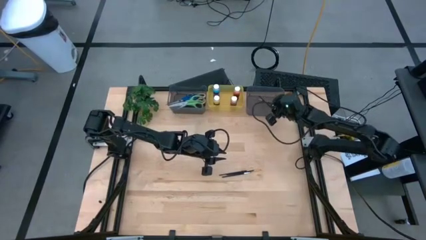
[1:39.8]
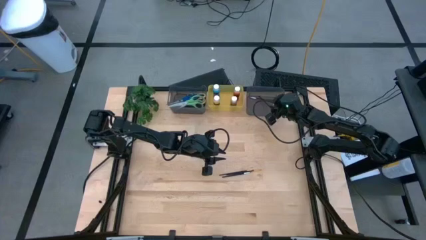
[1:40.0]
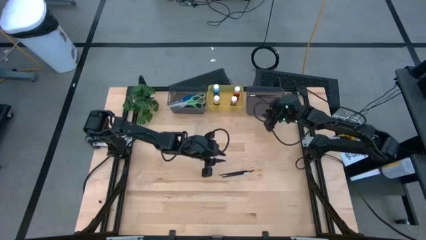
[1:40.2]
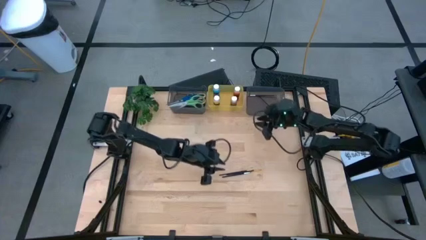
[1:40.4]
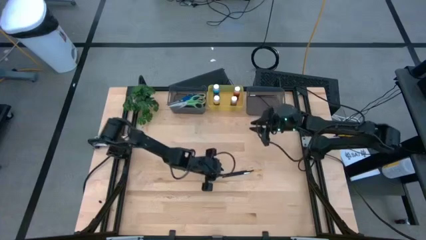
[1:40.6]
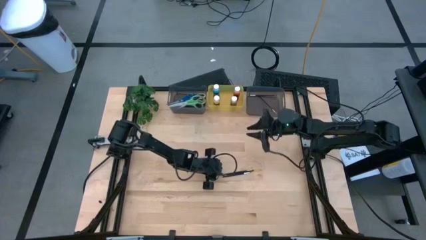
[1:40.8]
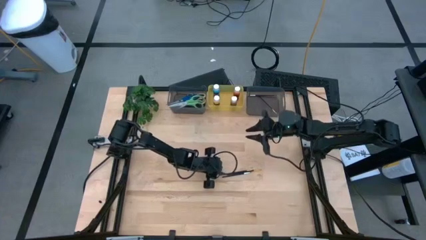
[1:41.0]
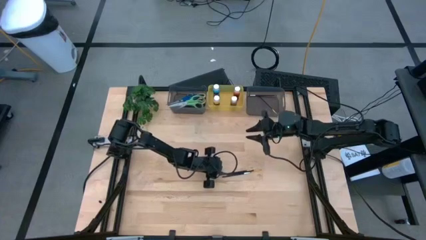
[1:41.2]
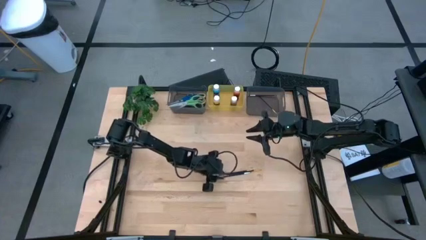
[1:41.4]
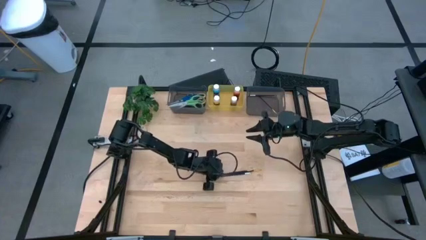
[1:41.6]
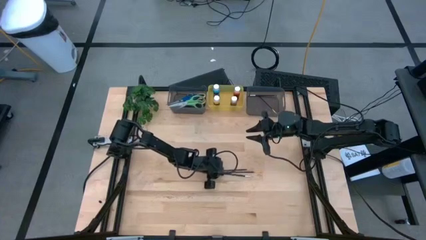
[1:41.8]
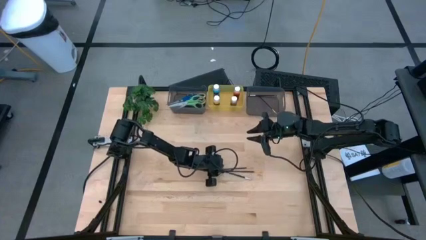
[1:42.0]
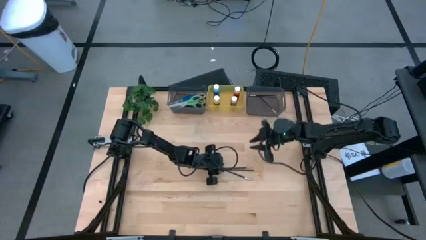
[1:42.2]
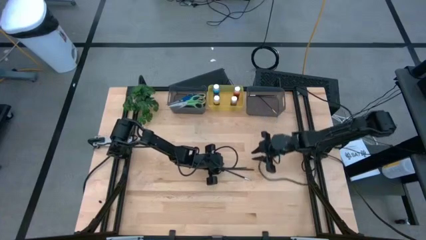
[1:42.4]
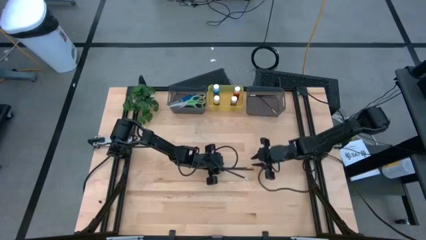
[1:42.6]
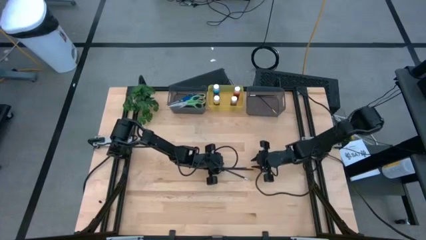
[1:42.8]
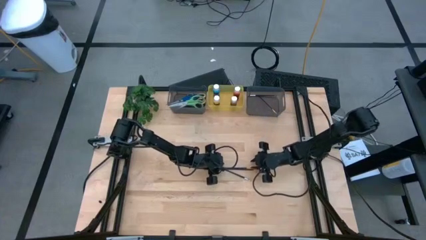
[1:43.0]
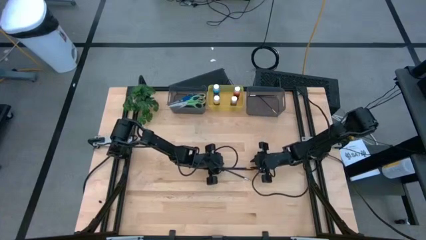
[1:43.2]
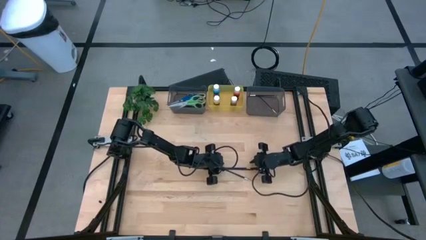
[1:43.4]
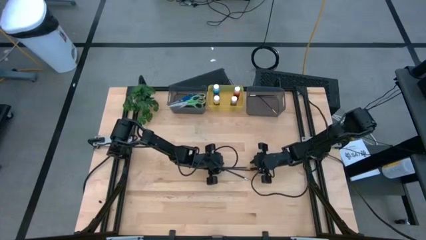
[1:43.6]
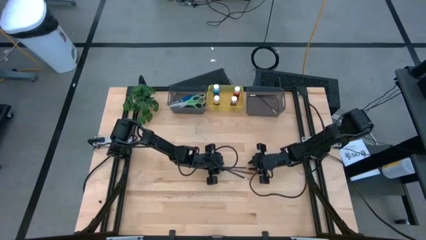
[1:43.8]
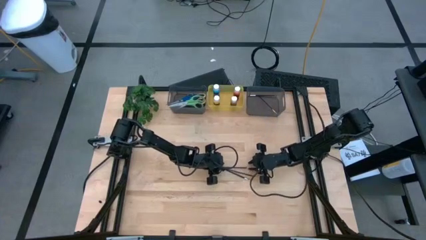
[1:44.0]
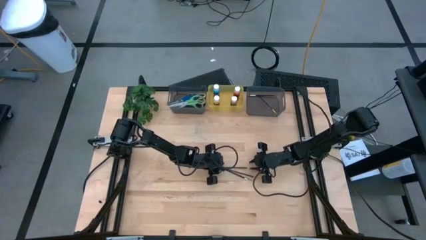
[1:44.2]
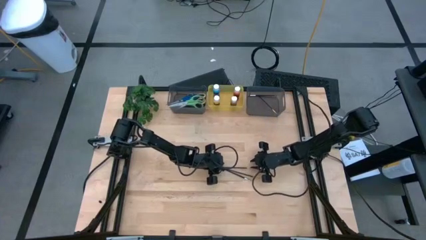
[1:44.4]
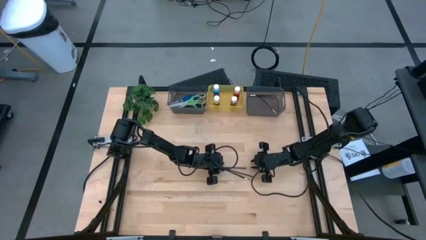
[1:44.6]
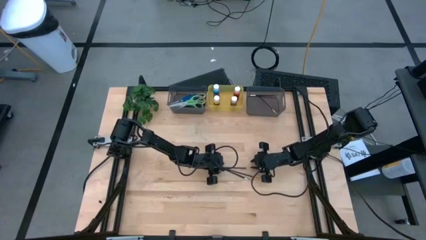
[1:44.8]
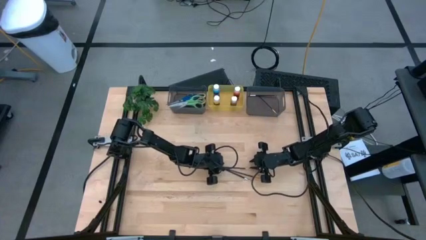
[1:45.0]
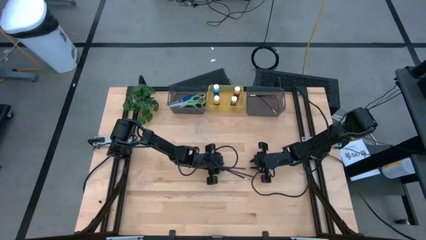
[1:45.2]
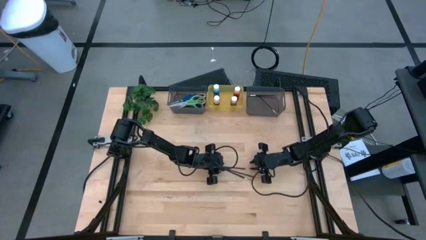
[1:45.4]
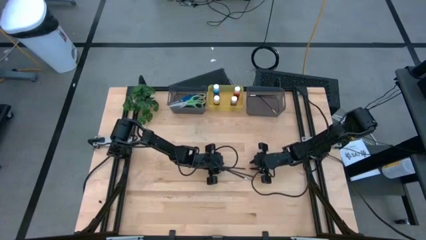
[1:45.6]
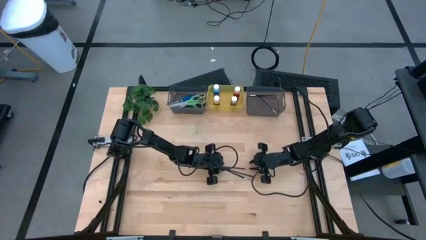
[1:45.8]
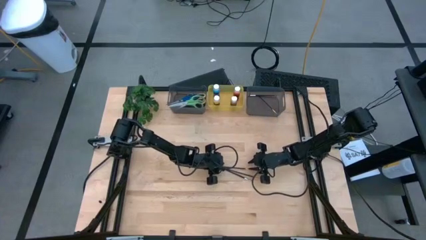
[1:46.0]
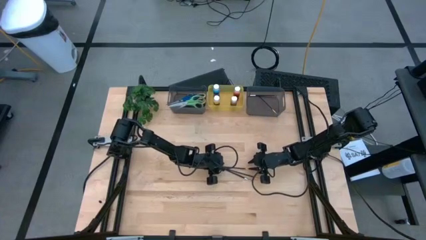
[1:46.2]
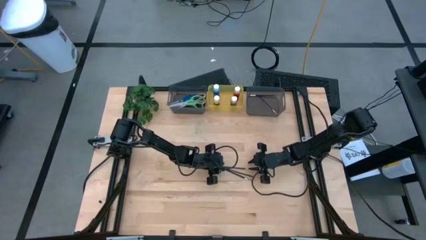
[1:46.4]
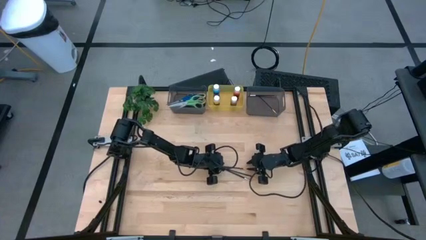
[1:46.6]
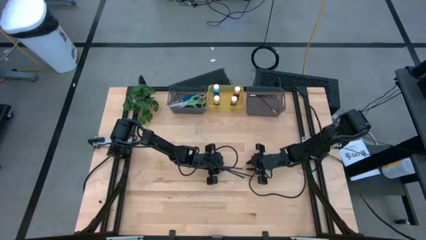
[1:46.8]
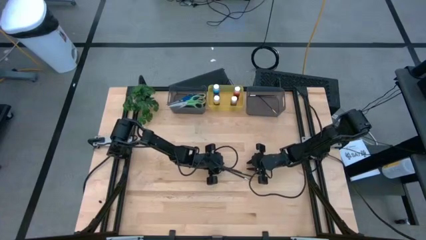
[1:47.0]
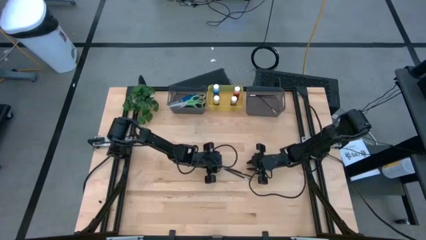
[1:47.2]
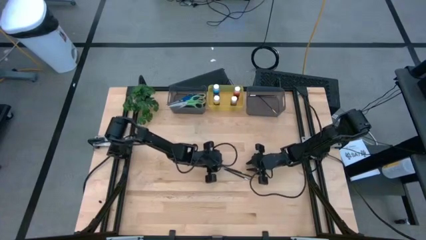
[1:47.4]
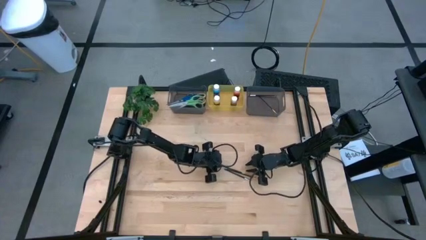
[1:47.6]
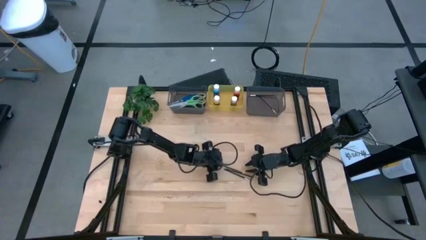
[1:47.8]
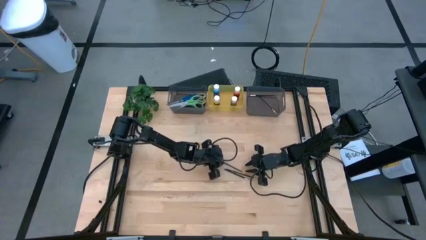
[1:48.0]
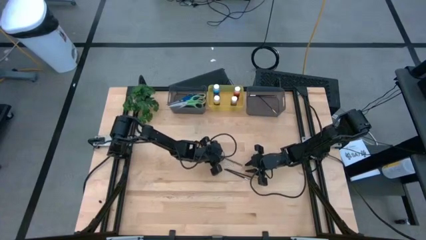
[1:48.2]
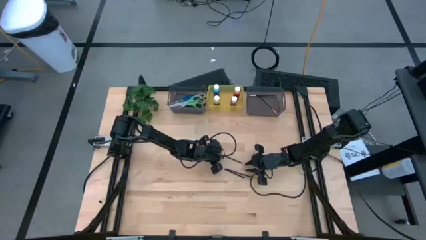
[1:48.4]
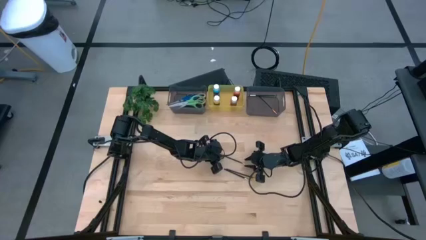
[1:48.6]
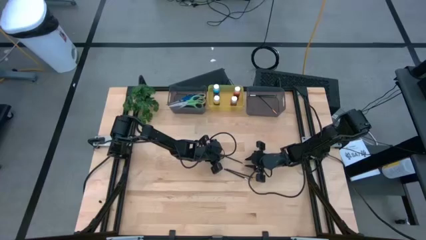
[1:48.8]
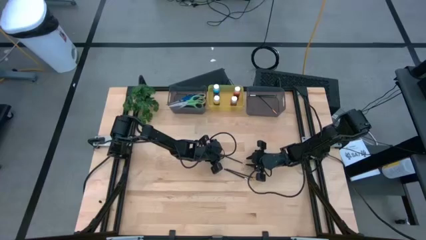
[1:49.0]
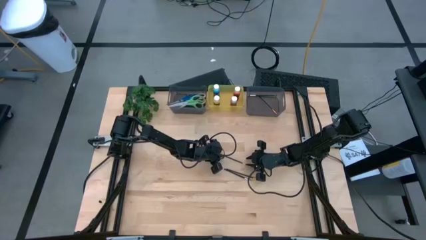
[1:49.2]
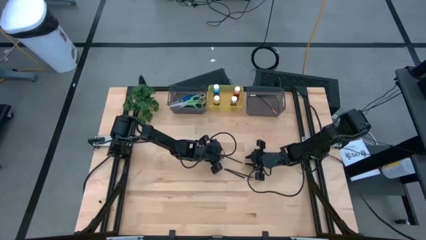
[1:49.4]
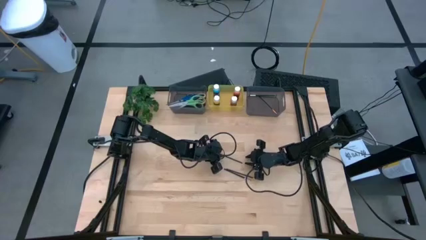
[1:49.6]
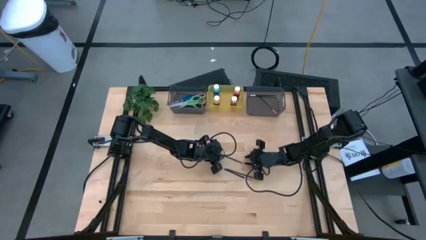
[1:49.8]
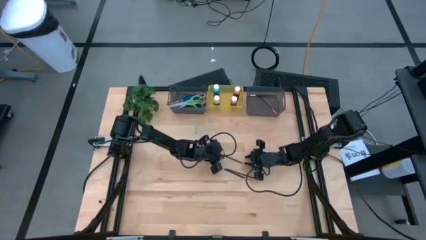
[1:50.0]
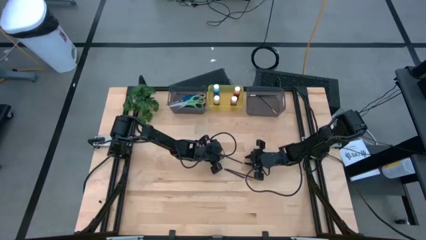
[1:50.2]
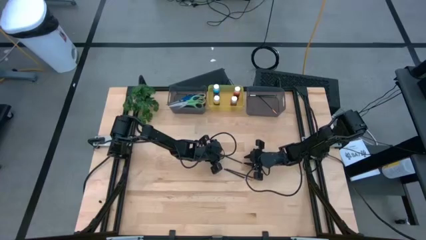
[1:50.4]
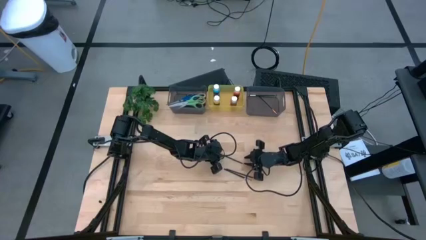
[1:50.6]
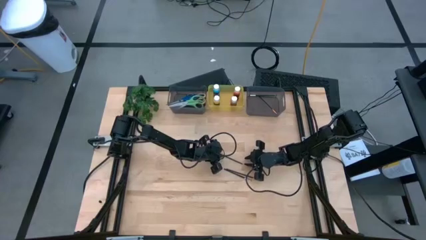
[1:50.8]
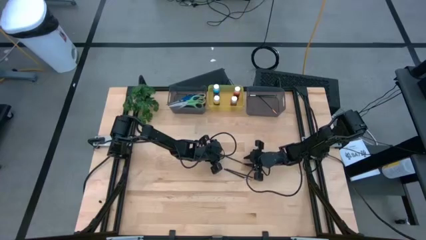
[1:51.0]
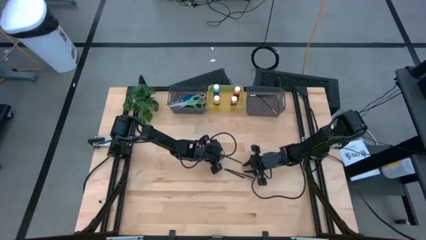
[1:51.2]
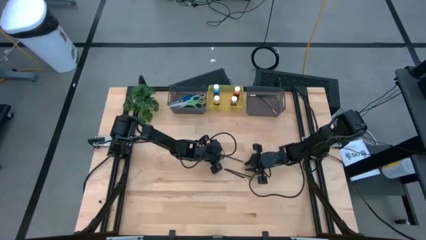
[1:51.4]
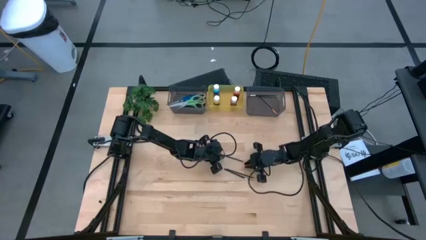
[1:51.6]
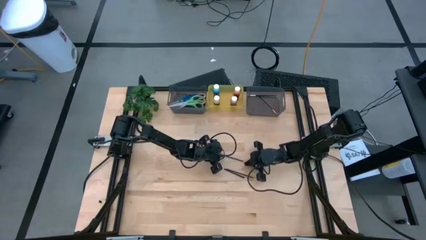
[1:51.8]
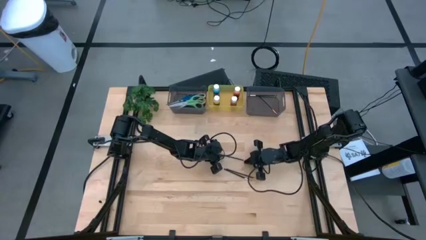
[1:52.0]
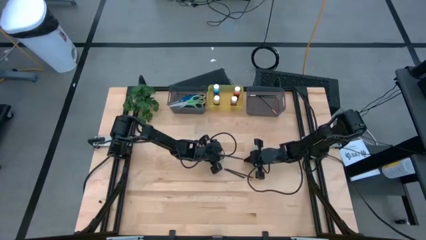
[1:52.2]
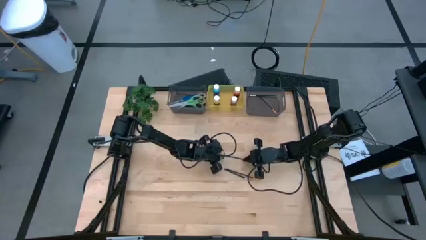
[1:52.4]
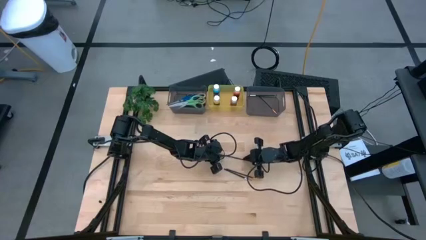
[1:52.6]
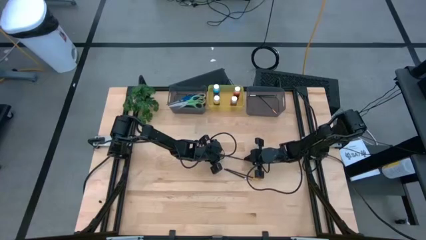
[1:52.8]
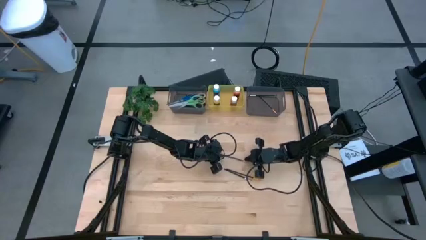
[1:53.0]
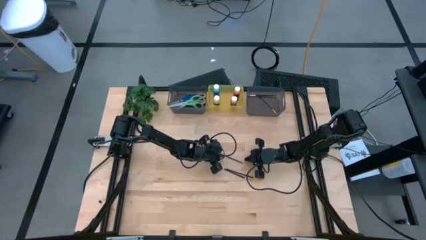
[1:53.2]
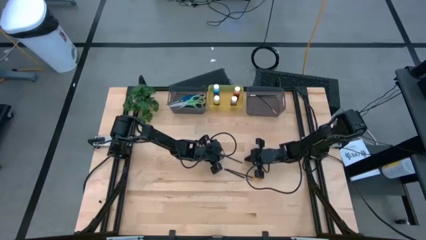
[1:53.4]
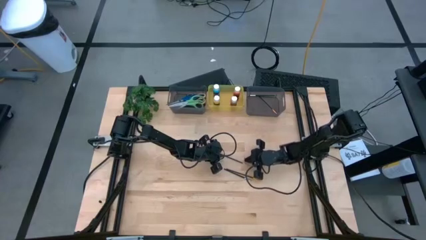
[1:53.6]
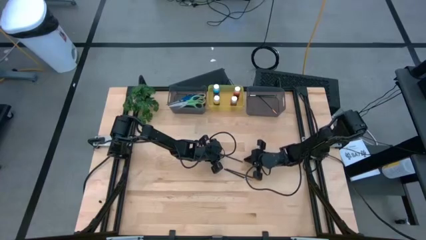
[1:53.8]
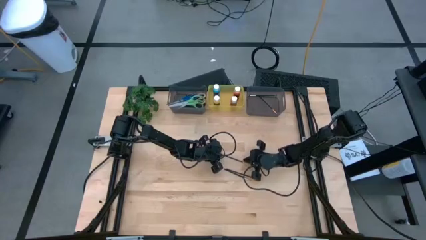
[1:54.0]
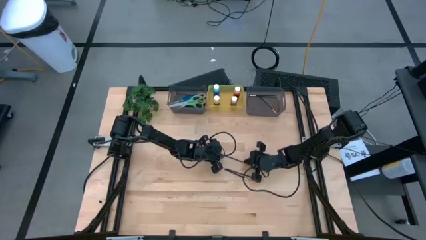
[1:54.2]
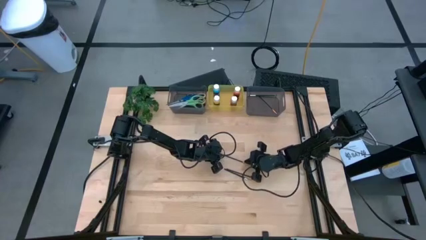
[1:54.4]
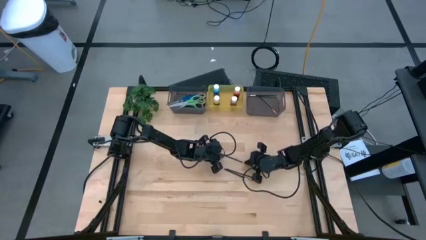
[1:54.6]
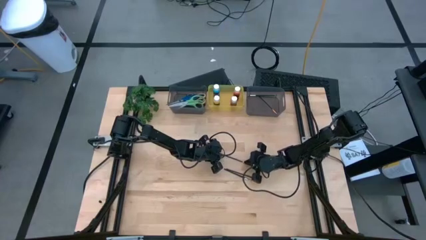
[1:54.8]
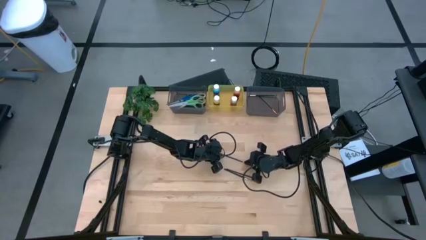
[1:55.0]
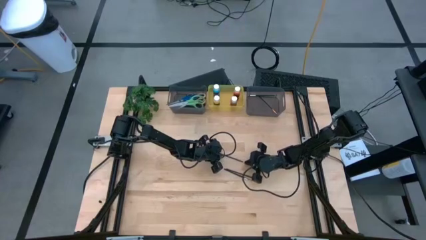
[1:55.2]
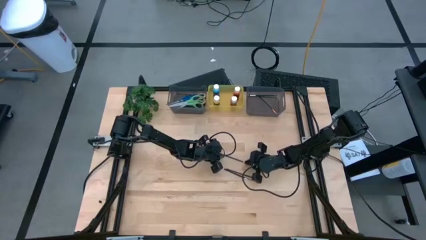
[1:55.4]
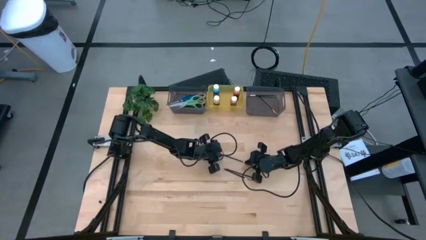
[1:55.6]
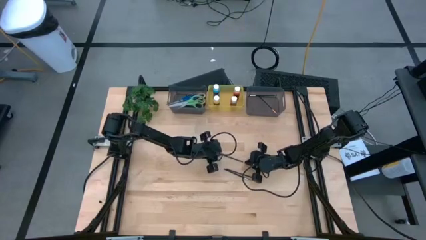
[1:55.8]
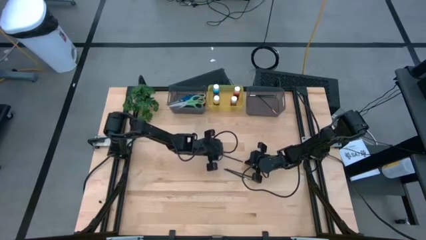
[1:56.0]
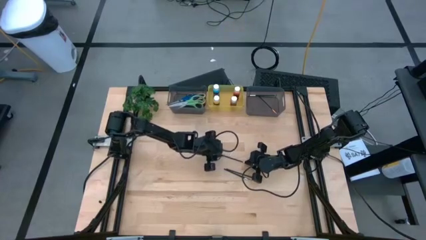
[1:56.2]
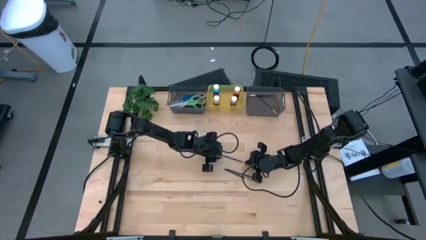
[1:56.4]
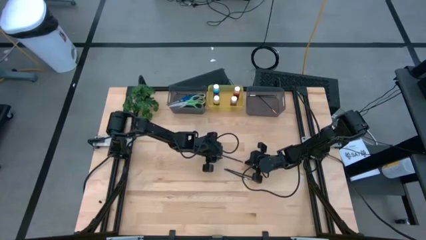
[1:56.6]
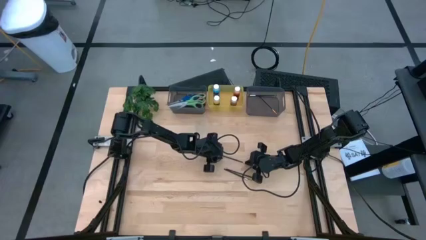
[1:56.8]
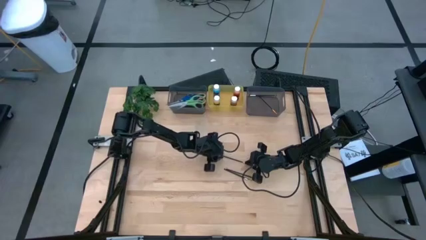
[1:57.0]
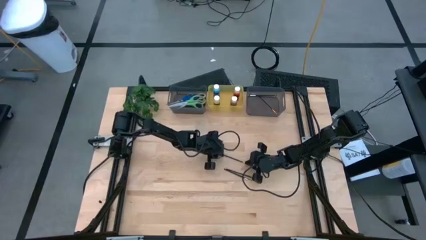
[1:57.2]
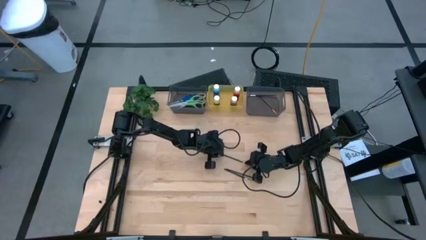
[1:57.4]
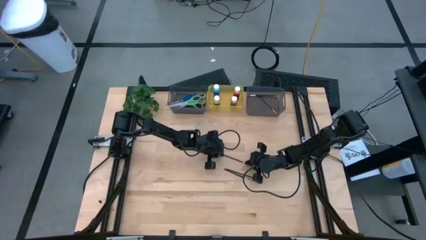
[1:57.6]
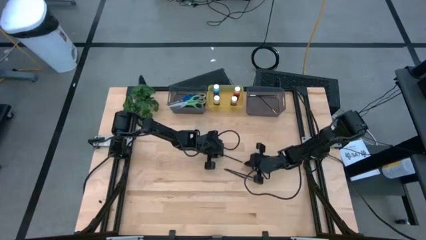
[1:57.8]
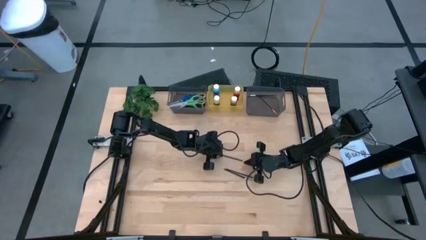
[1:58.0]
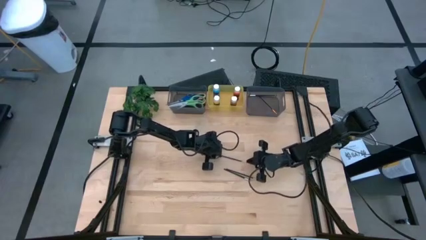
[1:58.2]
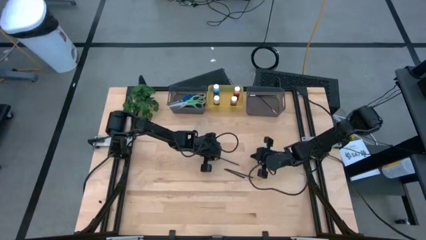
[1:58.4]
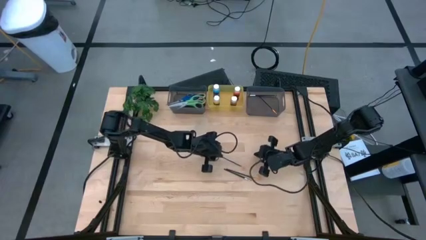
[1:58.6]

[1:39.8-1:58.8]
Task: Pick & Place Paint Supplies
Put the top gold paintbrush into the right black bin
